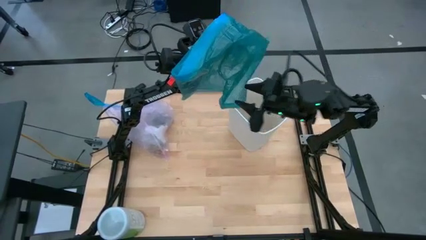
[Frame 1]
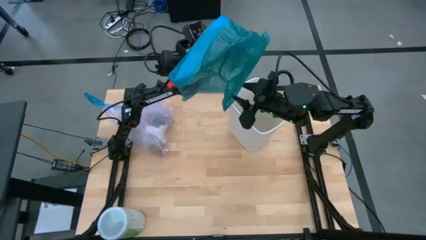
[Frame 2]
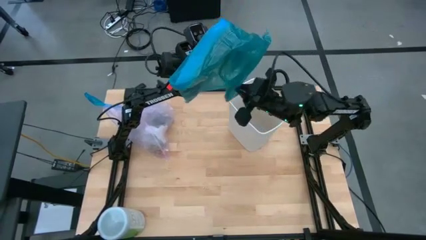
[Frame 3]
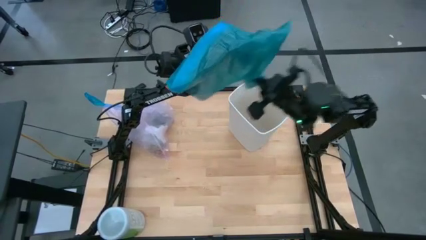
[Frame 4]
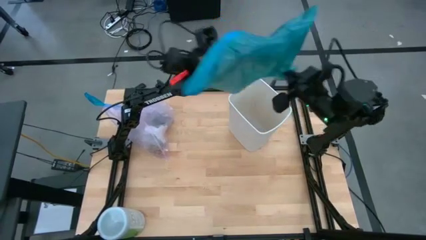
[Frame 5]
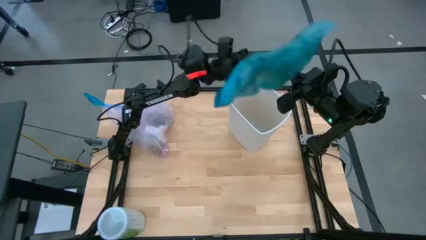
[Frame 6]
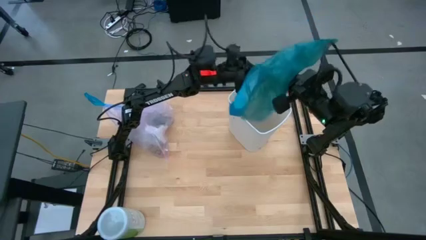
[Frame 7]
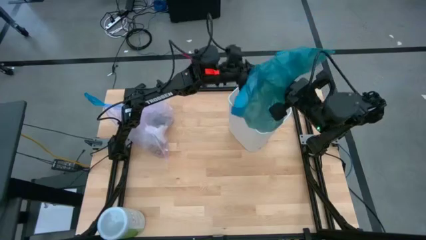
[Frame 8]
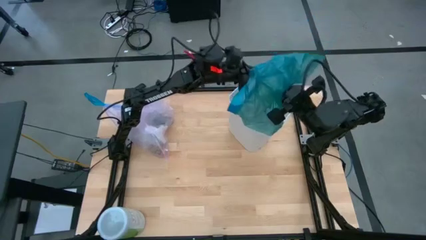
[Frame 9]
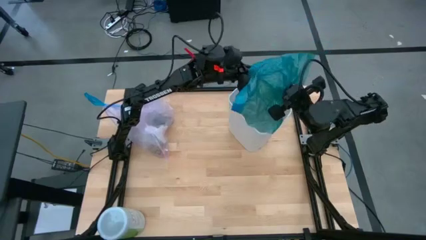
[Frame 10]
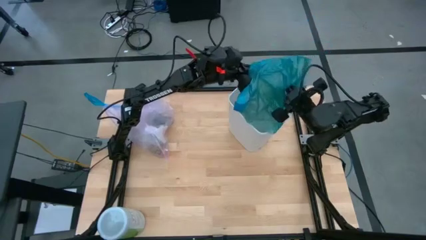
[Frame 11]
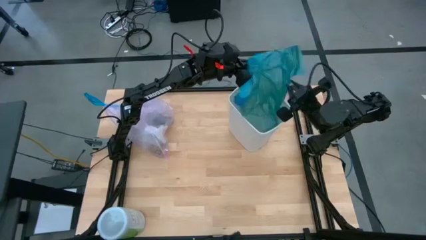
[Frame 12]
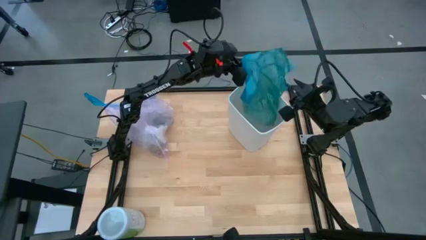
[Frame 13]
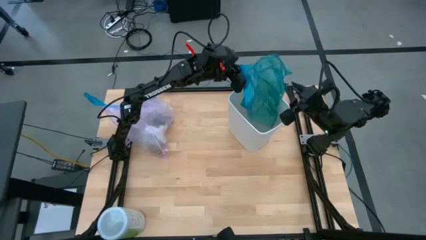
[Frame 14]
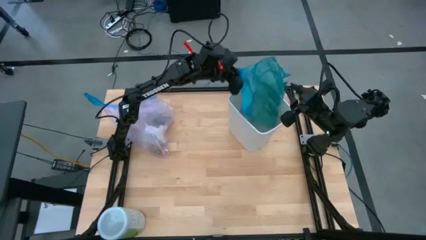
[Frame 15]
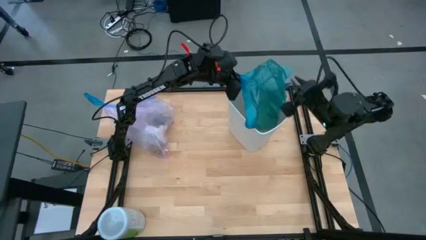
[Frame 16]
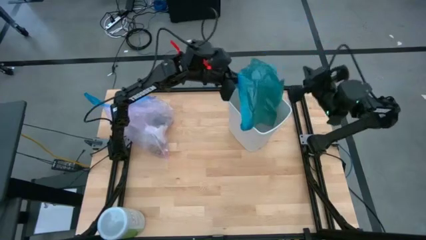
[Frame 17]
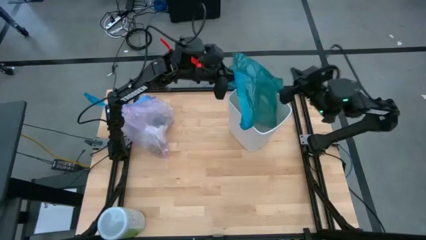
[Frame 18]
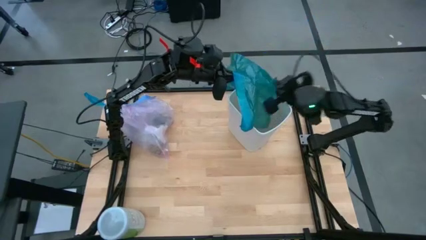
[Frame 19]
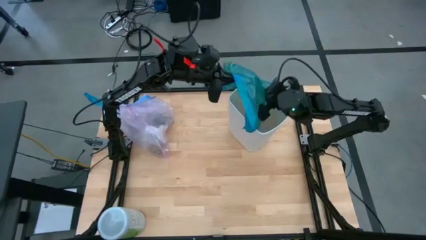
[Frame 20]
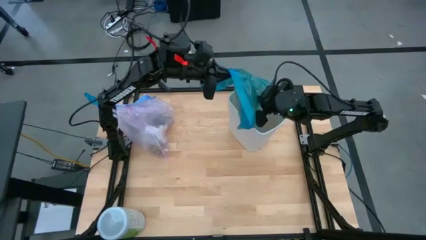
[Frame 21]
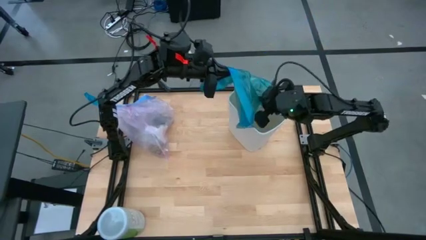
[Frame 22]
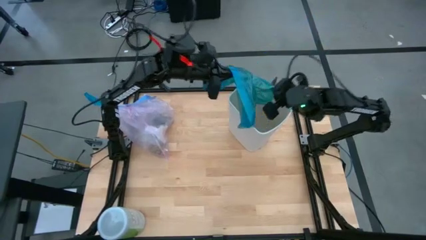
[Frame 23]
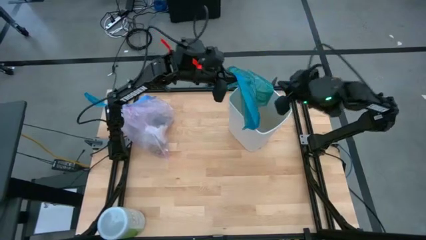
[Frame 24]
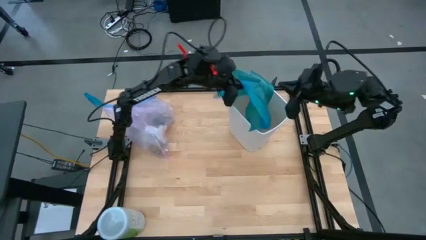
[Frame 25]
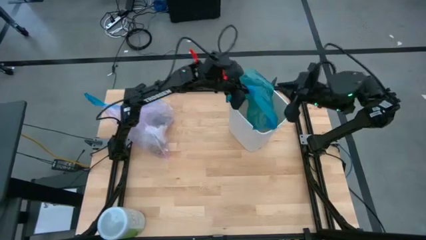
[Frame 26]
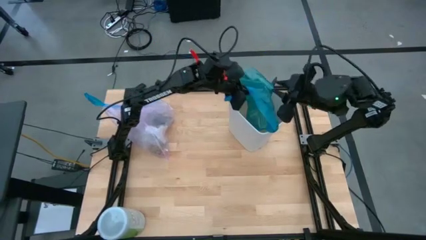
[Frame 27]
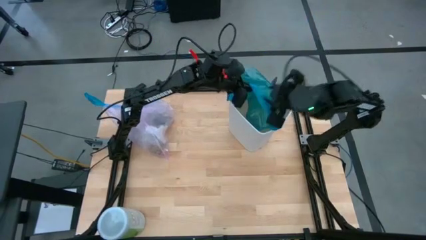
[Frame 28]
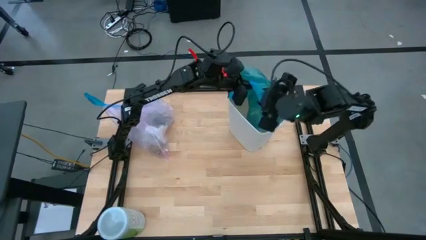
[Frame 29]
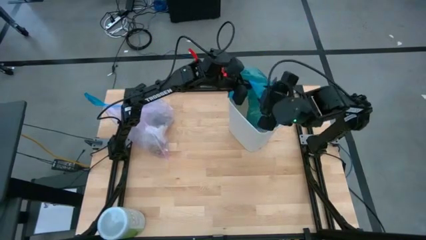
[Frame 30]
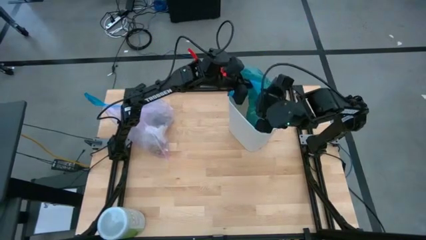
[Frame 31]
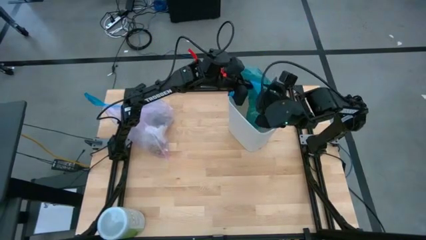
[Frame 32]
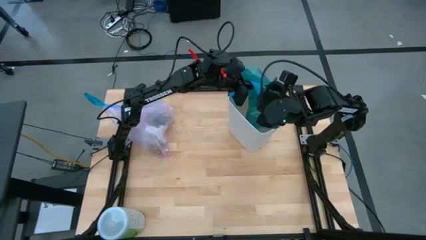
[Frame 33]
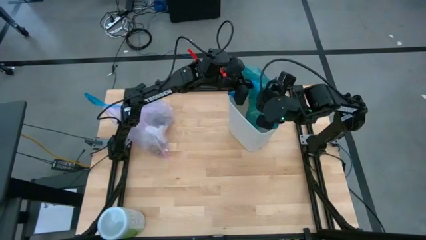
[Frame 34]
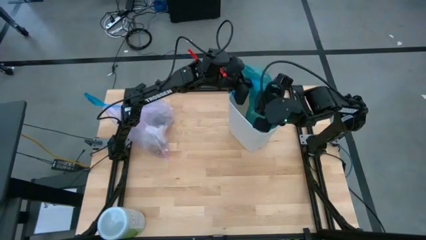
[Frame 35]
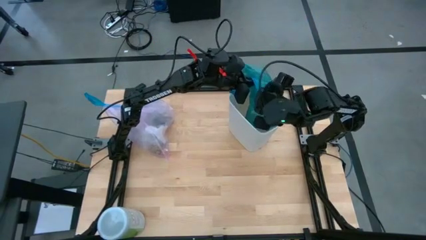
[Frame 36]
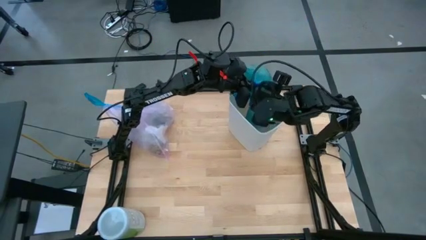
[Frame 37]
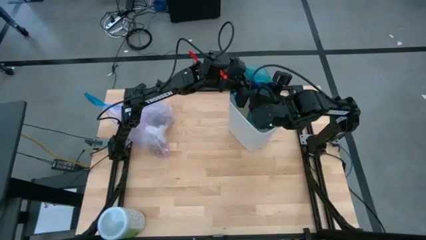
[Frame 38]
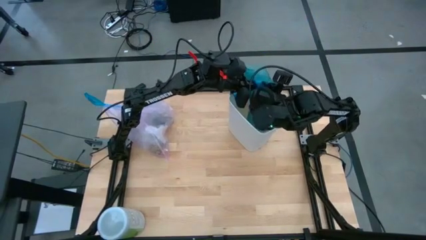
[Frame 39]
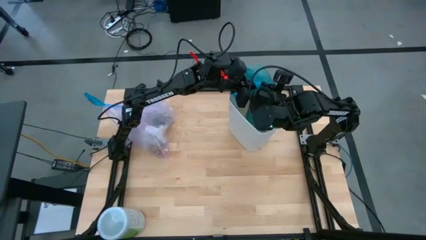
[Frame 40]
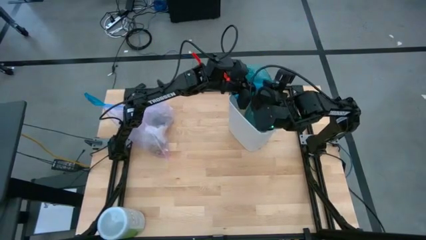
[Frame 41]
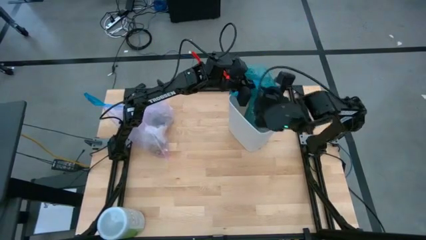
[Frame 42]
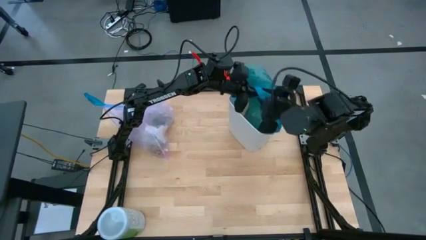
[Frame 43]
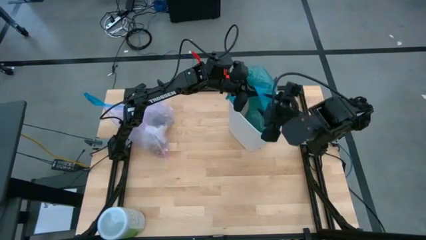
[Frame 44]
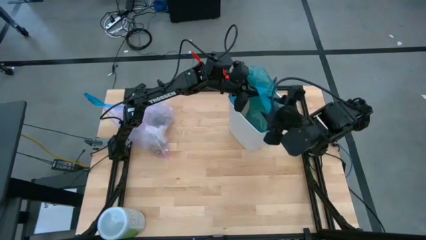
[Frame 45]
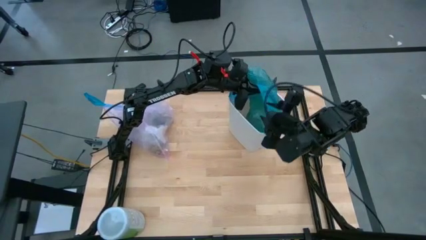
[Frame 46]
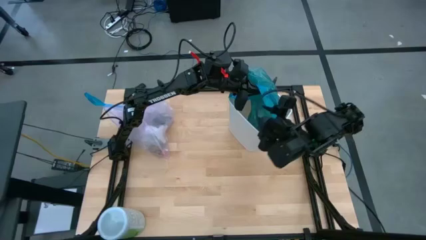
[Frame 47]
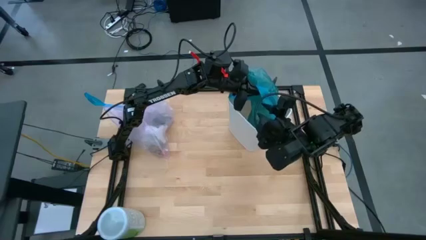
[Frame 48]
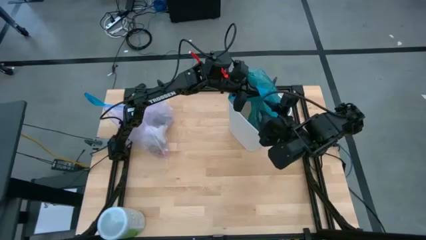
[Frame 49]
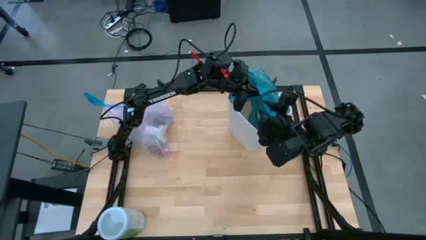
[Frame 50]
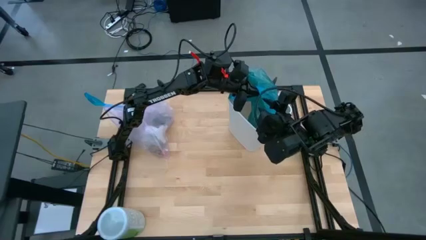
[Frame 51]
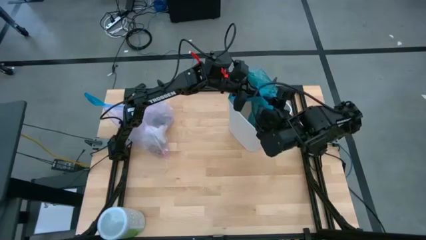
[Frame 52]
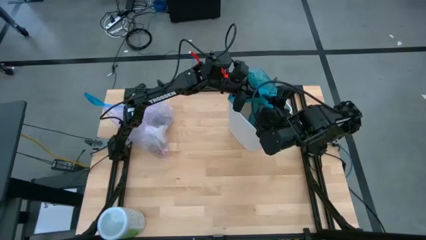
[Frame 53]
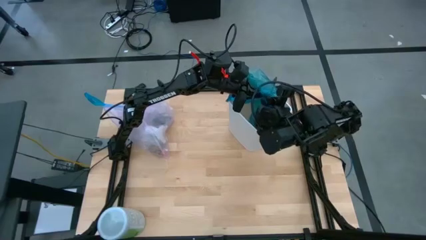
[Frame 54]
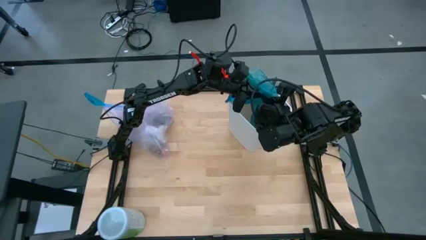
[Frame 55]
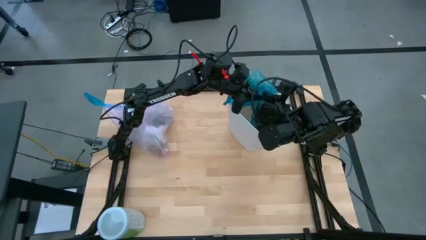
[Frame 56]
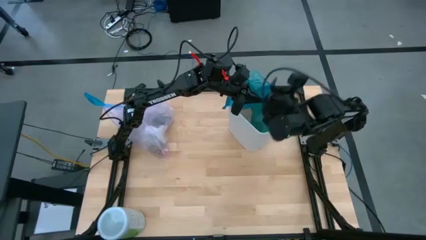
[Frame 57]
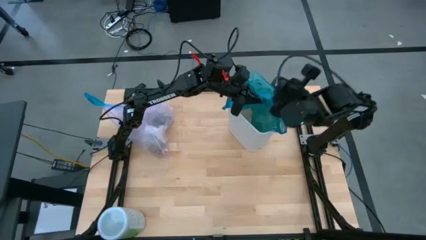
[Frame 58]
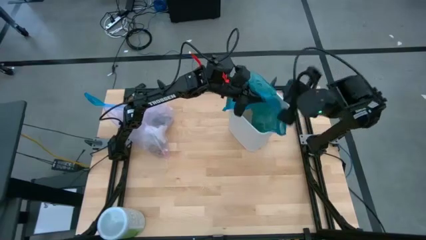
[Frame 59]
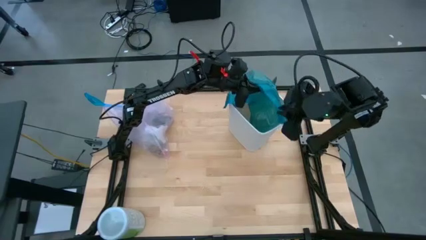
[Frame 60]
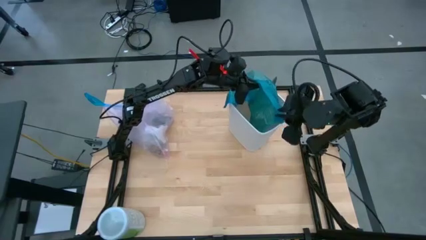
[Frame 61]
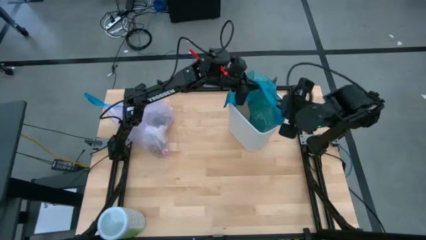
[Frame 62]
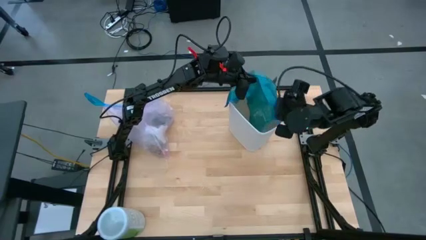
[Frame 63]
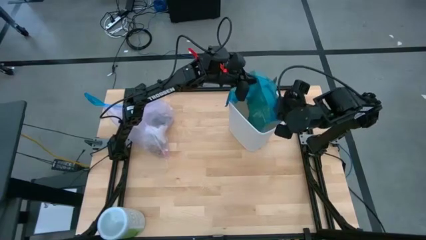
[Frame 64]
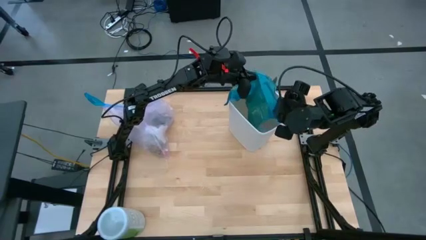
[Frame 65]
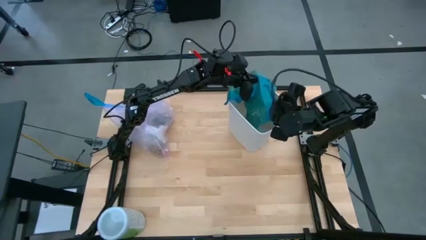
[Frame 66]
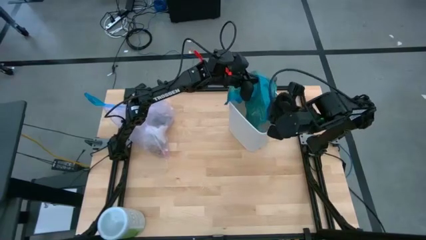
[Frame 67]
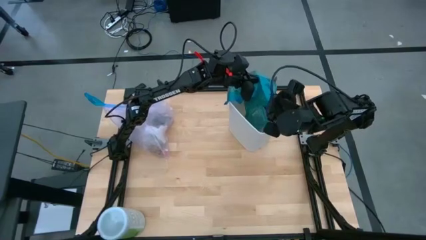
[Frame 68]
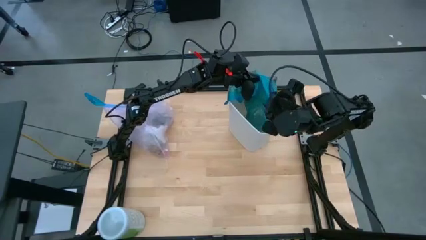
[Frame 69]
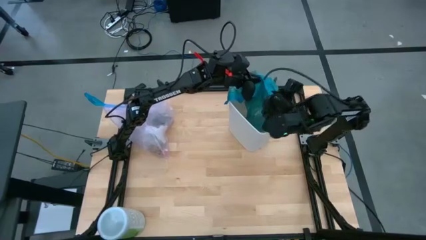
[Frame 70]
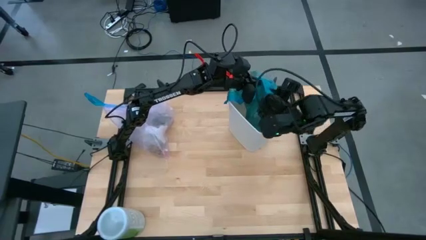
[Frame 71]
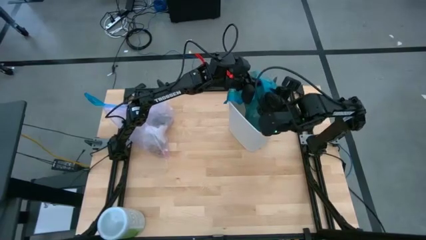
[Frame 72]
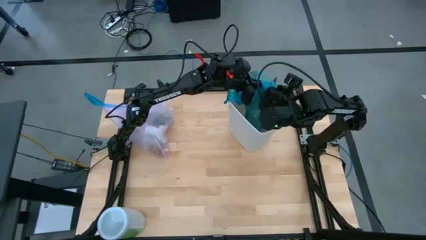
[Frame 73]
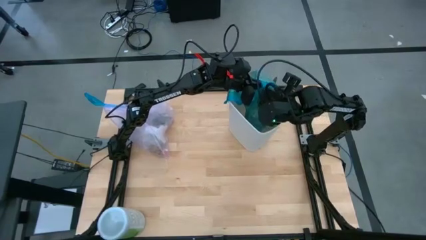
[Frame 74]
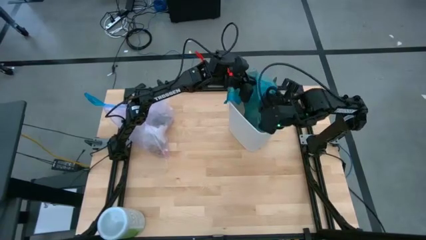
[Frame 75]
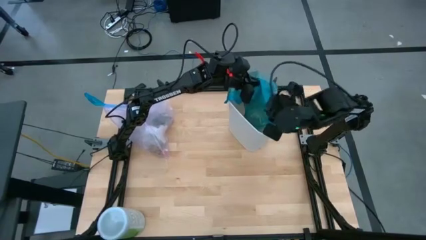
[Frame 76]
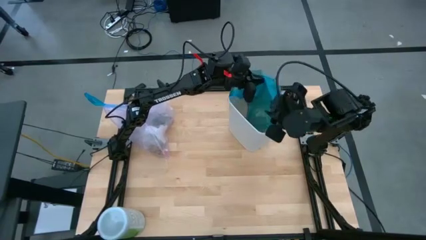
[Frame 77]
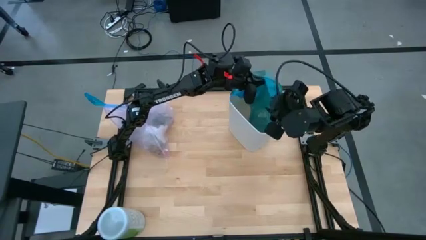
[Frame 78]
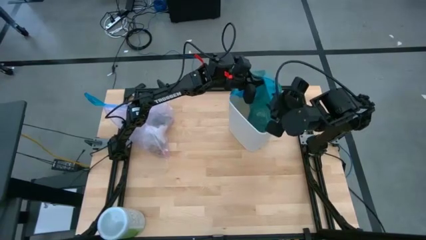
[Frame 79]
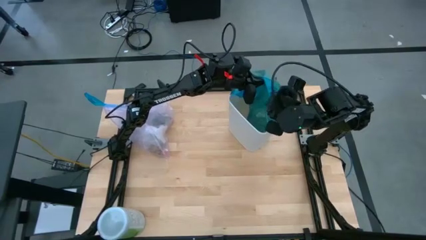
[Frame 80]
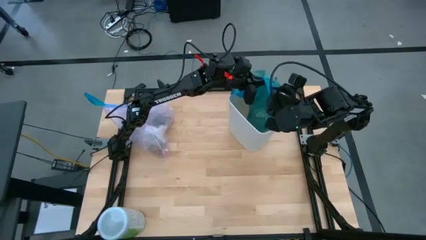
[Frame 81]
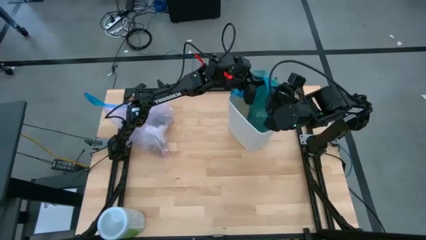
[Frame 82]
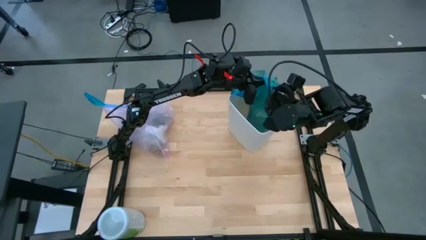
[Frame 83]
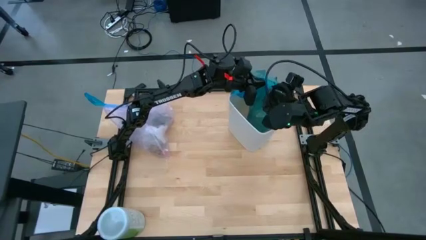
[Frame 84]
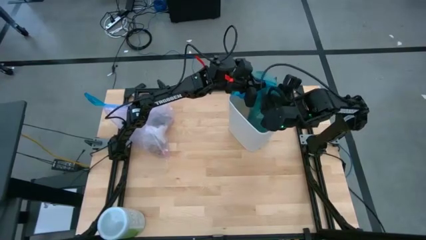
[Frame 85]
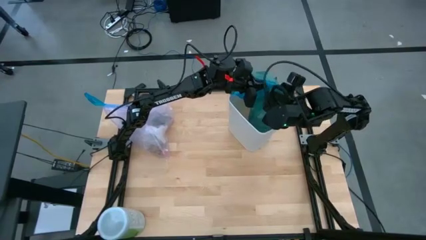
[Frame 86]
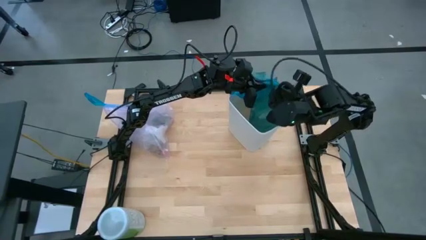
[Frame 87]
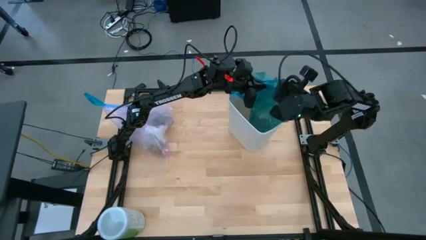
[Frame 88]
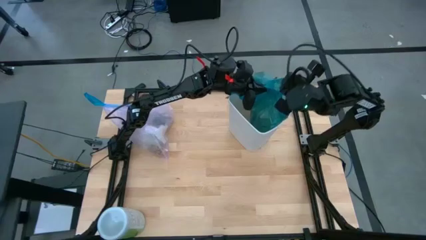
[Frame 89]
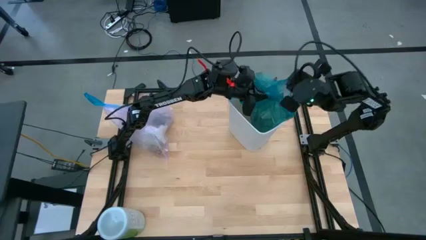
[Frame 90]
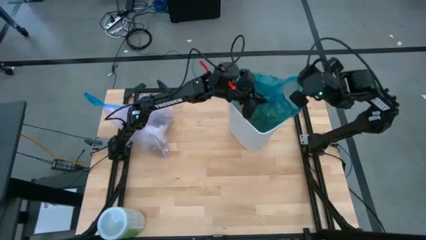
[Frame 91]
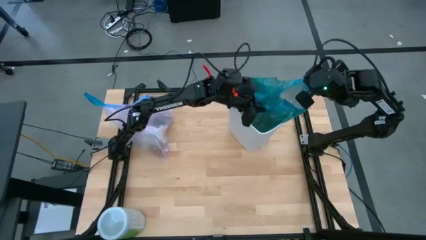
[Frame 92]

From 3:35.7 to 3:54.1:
Task: place trash/remove bag and relplace
Put the blue trash bag into the white trash bin
